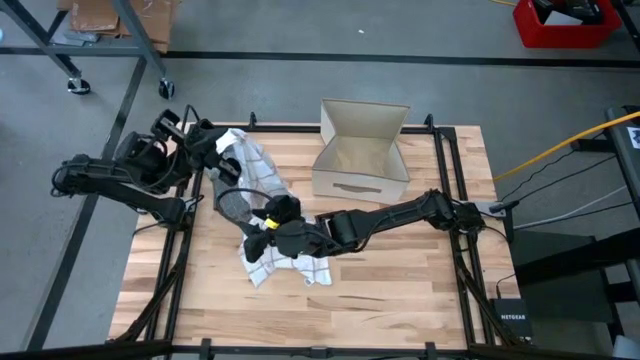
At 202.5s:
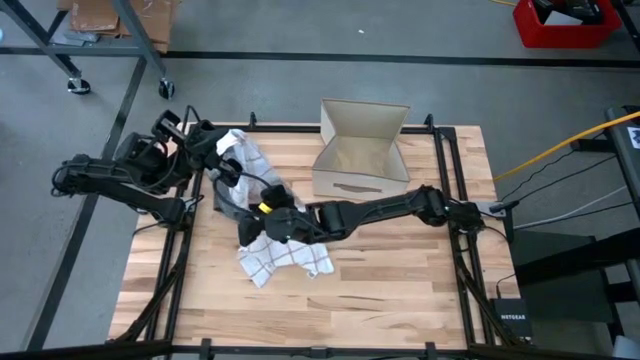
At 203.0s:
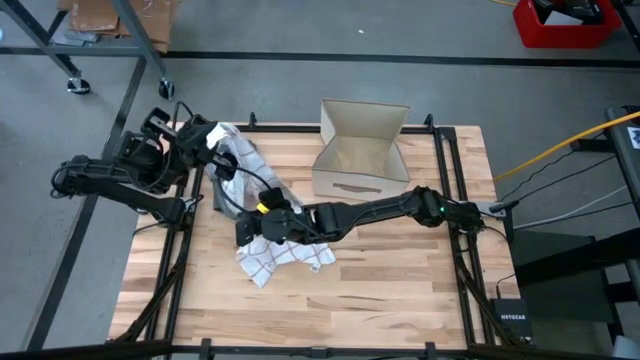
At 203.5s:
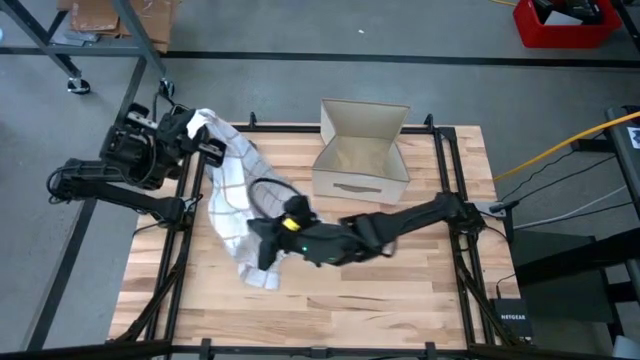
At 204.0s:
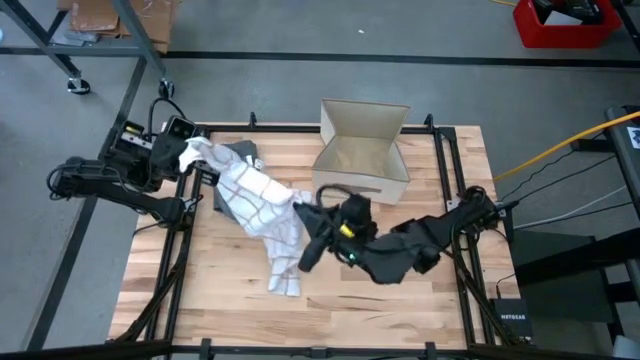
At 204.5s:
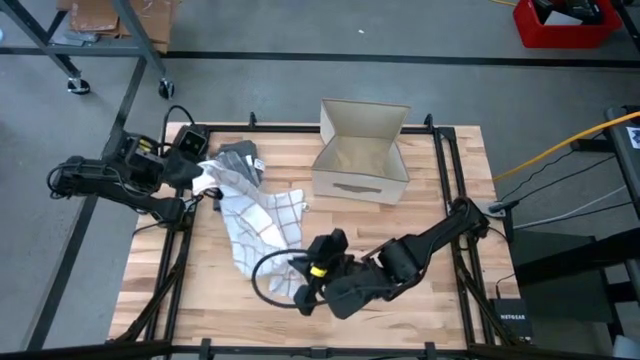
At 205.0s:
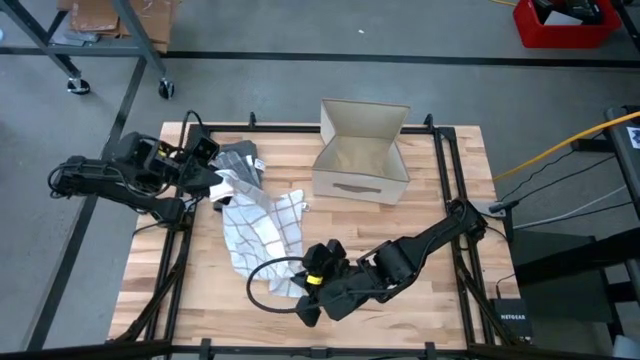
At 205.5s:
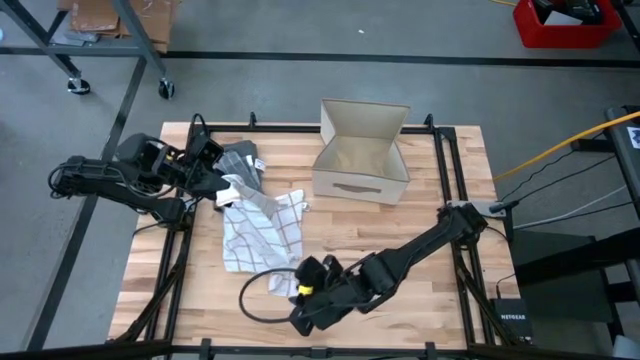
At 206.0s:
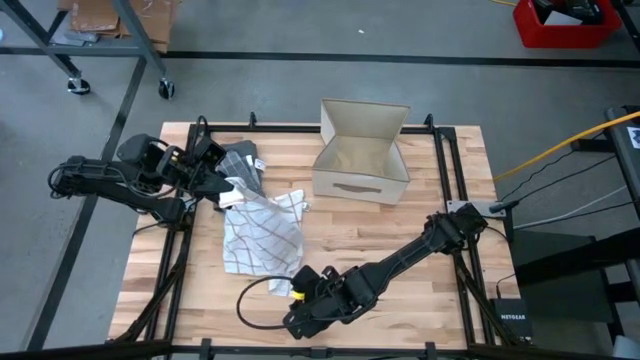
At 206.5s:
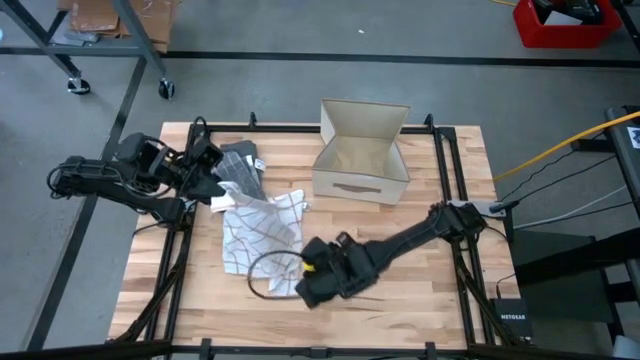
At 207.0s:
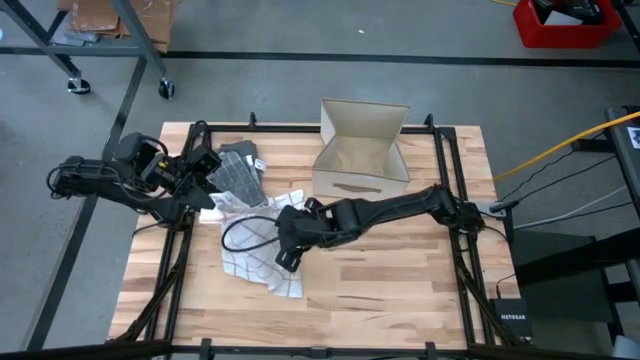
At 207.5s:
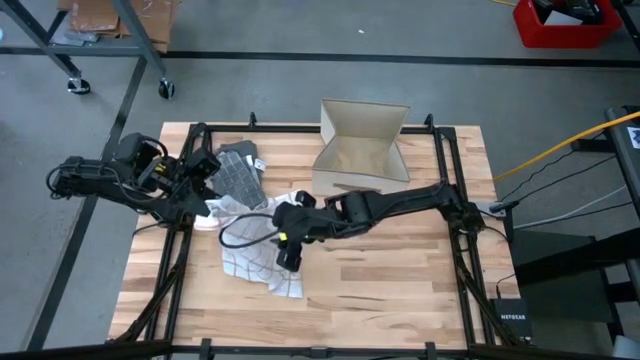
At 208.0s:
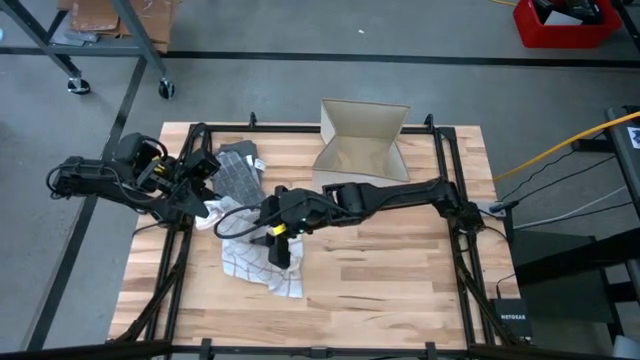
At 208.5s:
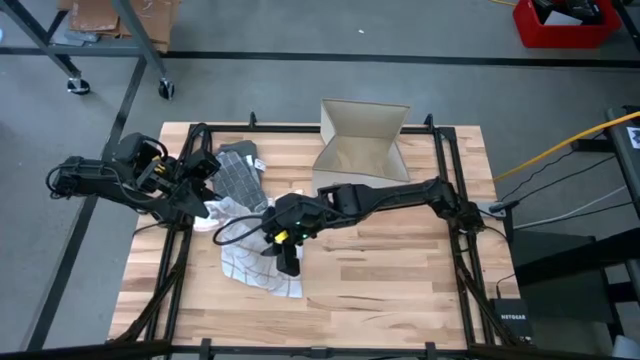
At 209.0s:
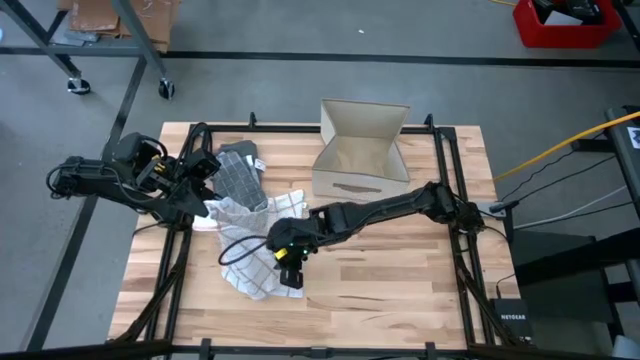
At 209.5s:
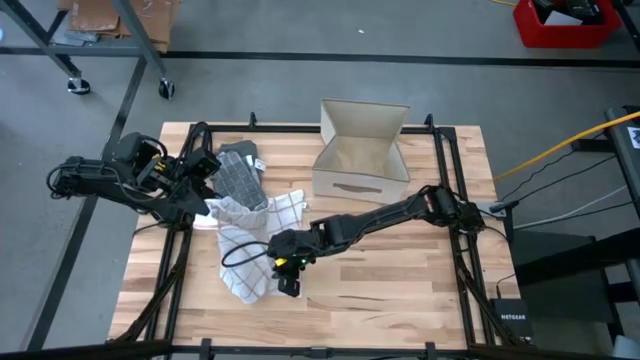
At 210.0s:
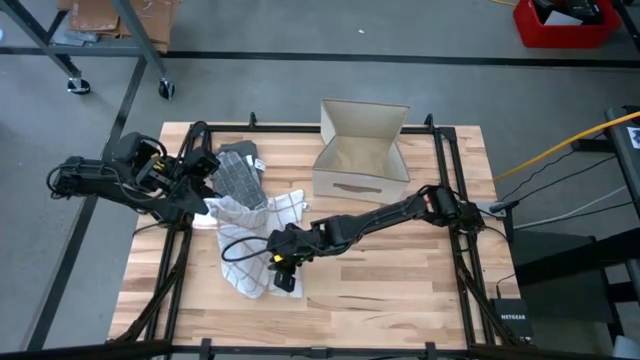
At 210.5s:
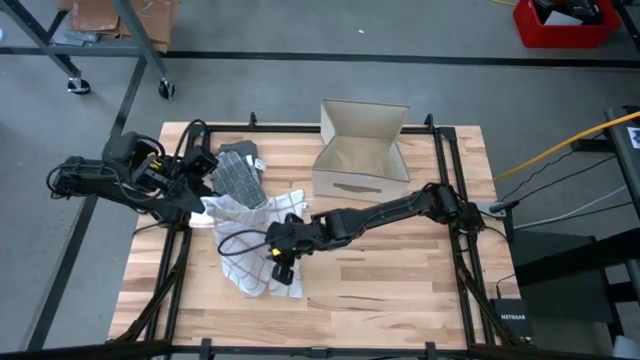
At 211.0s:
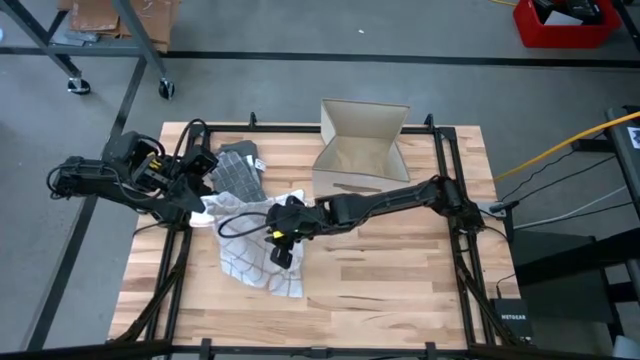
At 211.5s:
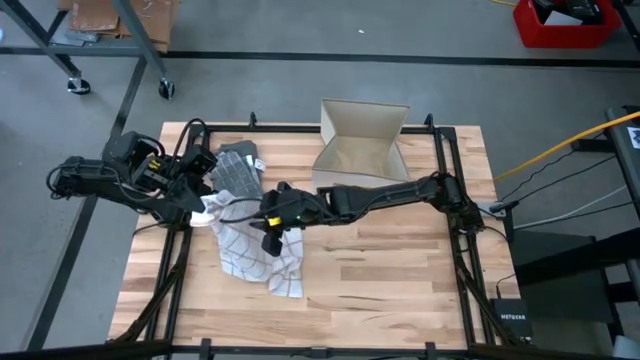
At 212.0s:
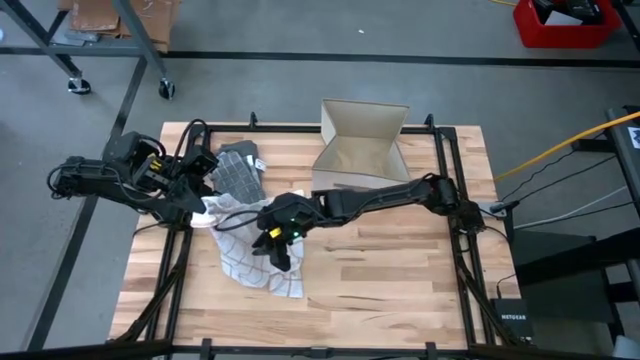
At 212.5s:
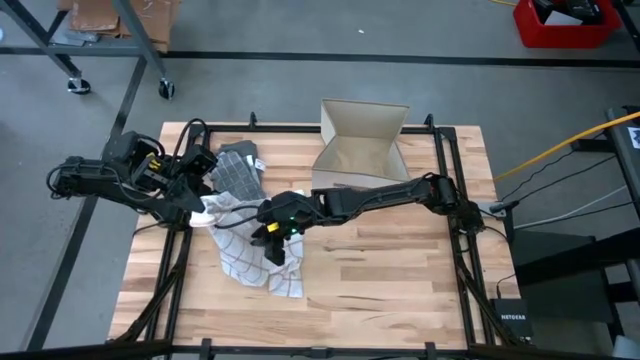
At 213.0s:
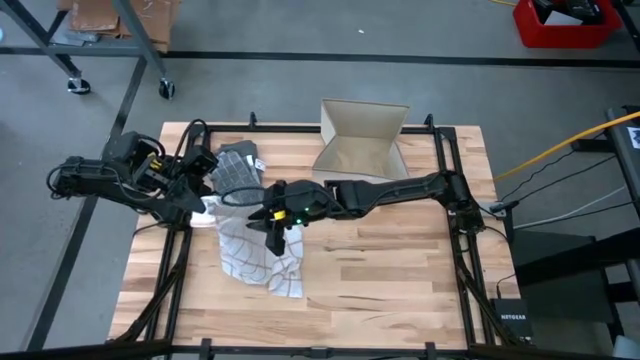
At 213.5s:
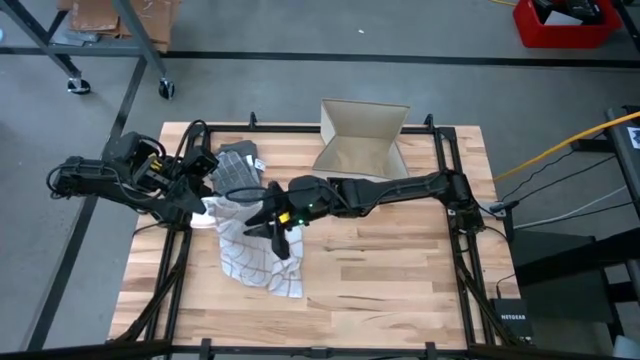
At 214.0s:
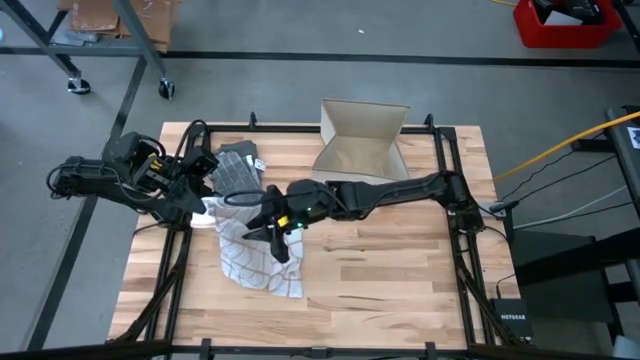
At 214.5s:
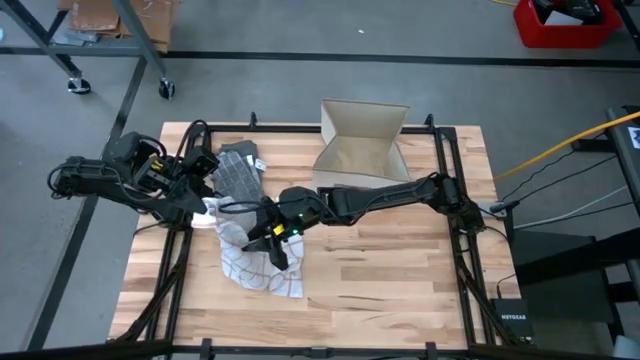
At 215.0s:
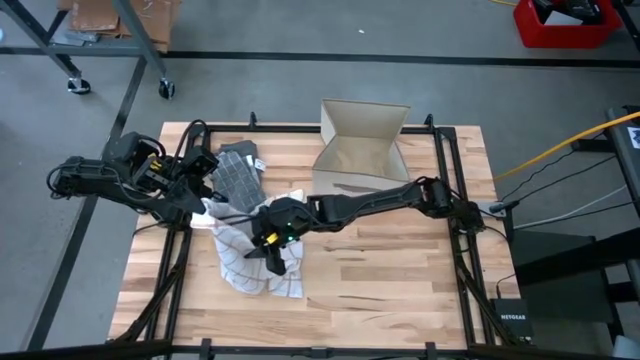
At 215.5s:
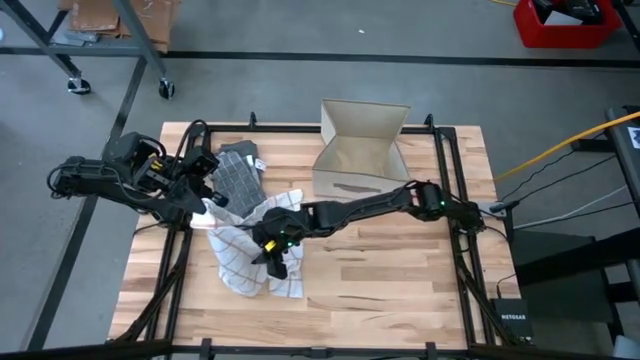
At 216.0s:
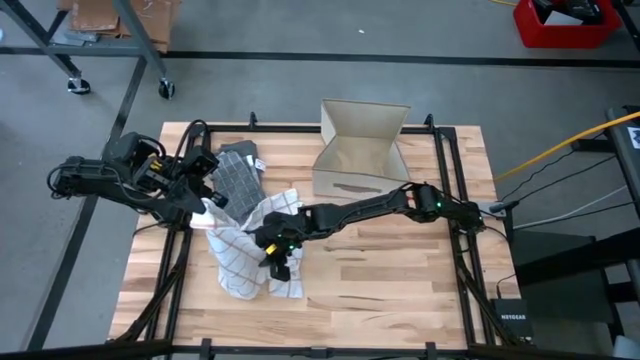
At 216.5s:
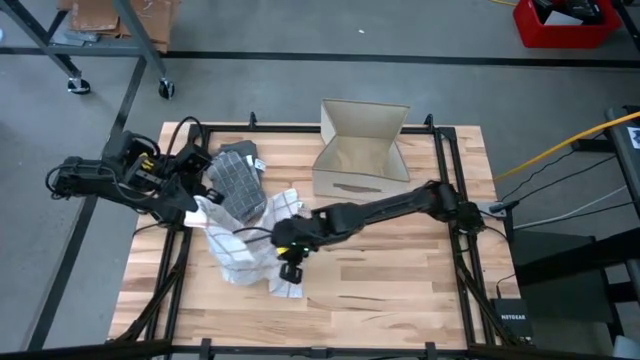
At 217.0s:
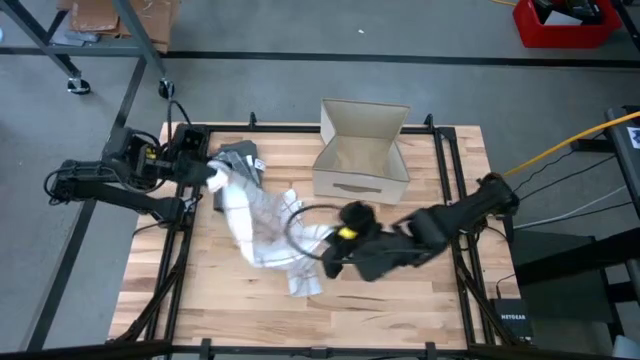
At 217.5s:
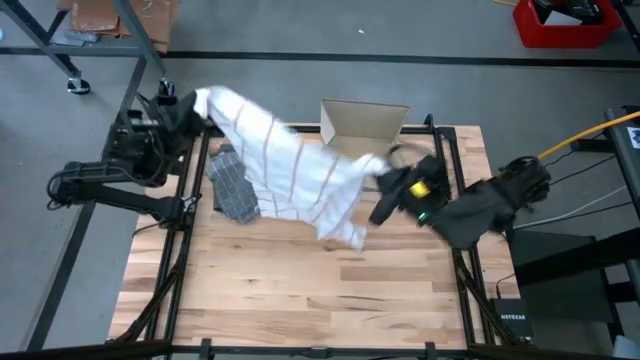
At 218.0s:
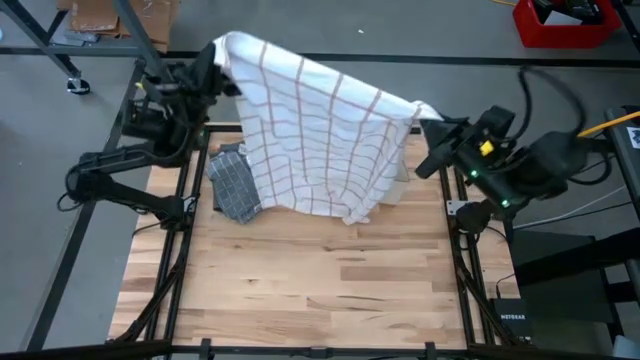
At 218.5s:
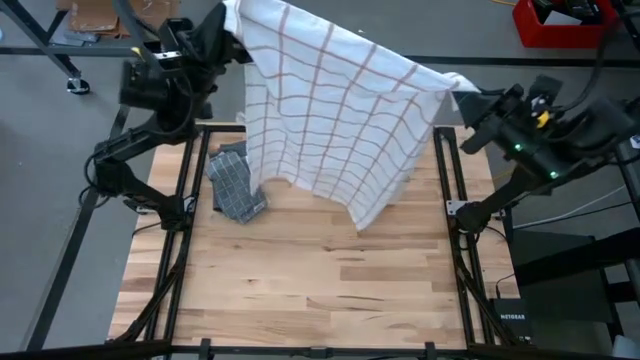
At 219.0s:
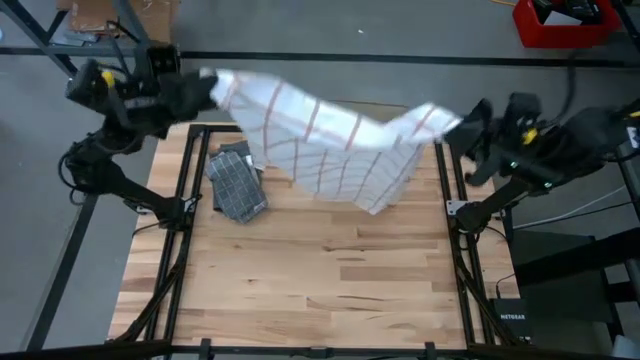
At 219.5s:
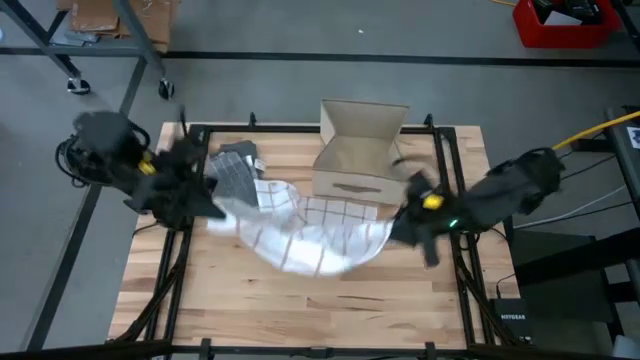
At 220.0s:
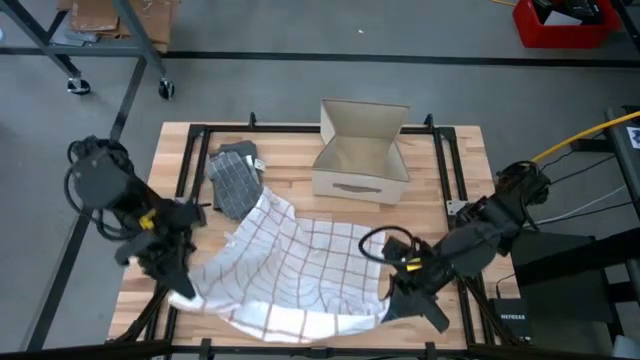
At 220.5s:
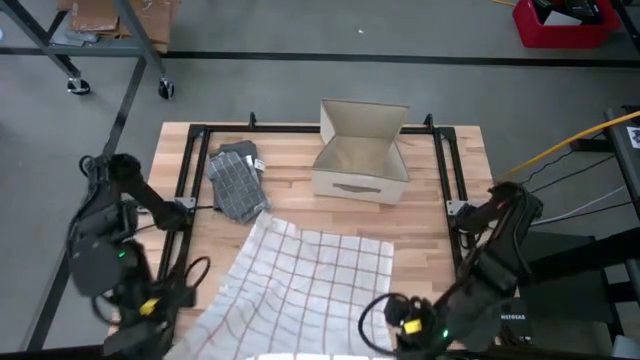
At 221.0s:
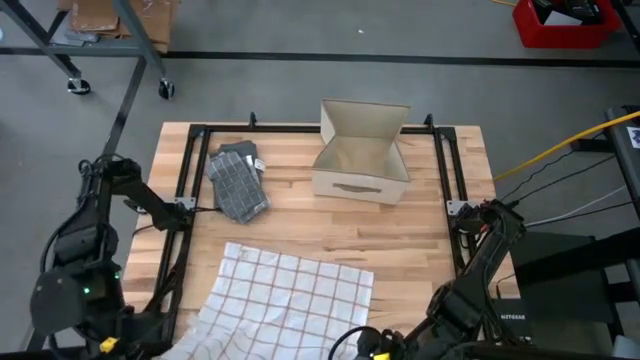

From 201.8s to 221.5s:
Task: Fold towel
Fold the white towel
